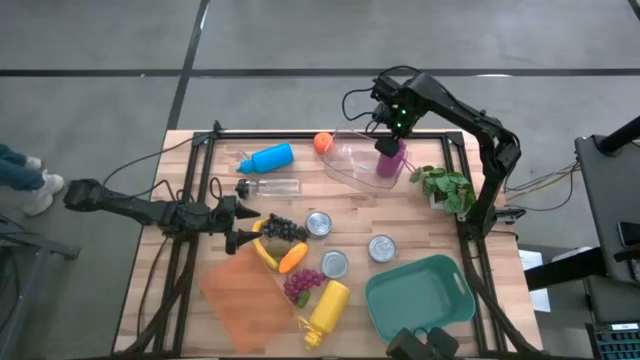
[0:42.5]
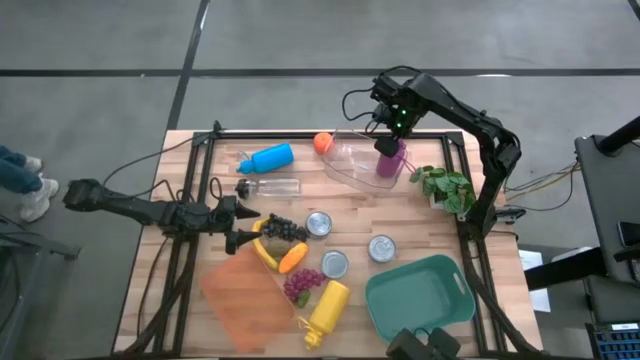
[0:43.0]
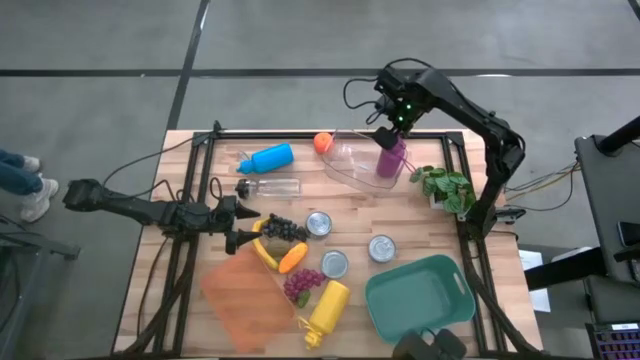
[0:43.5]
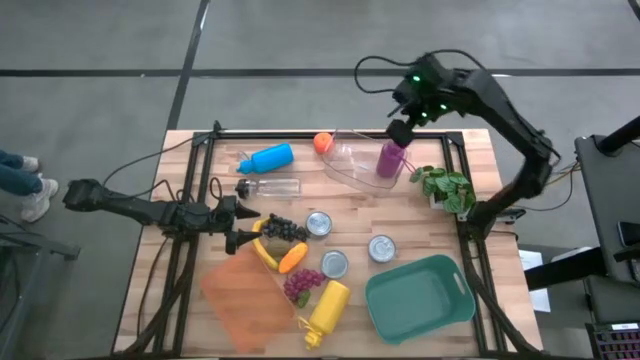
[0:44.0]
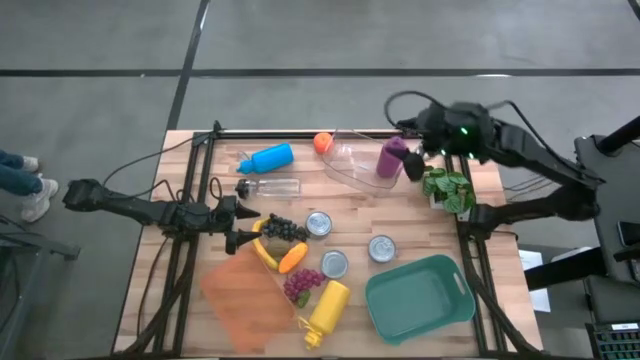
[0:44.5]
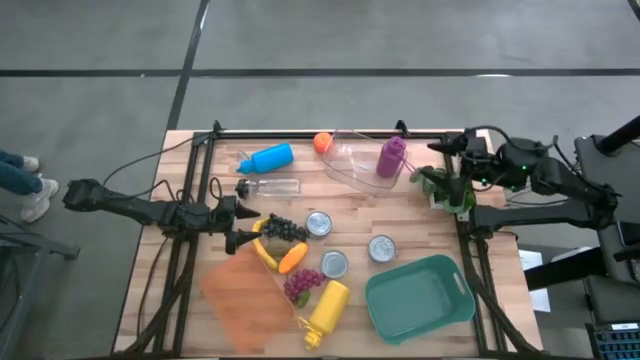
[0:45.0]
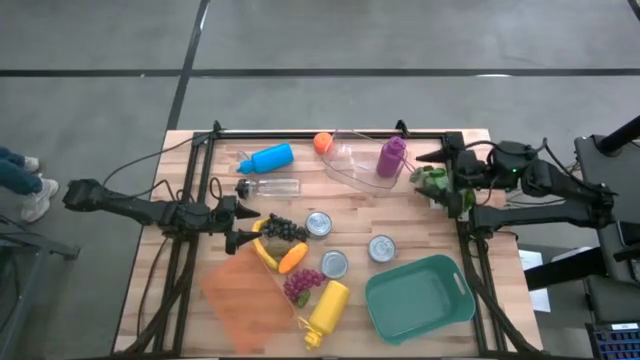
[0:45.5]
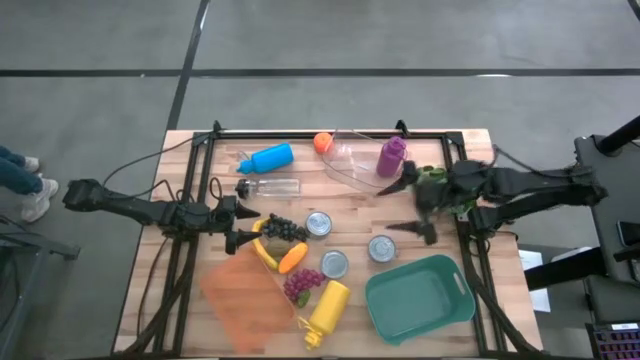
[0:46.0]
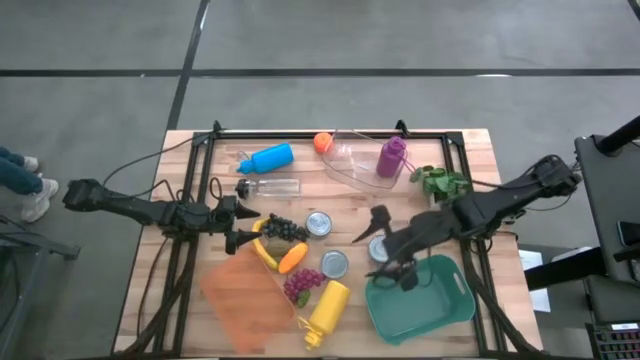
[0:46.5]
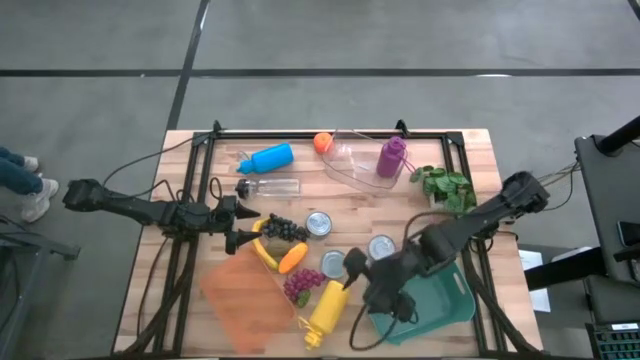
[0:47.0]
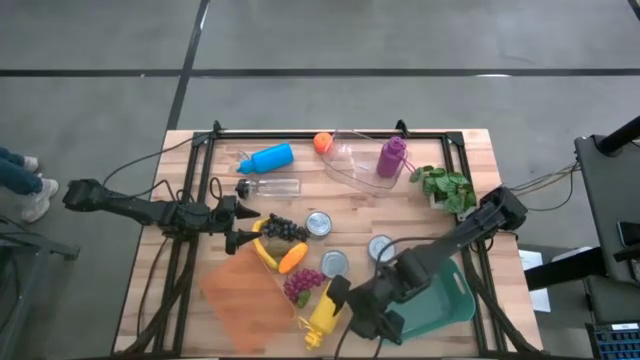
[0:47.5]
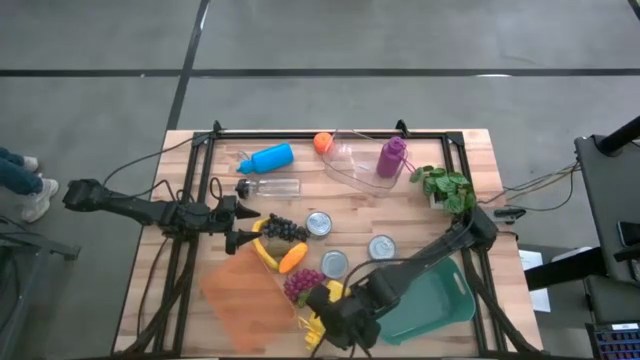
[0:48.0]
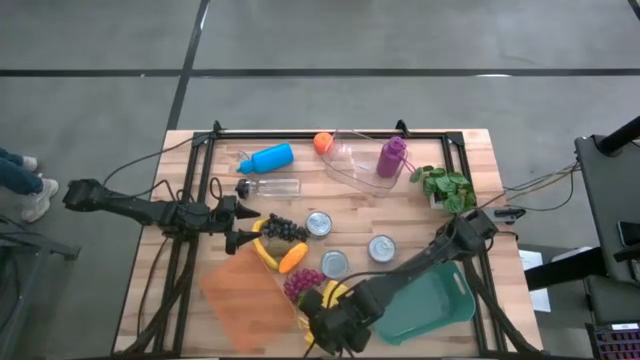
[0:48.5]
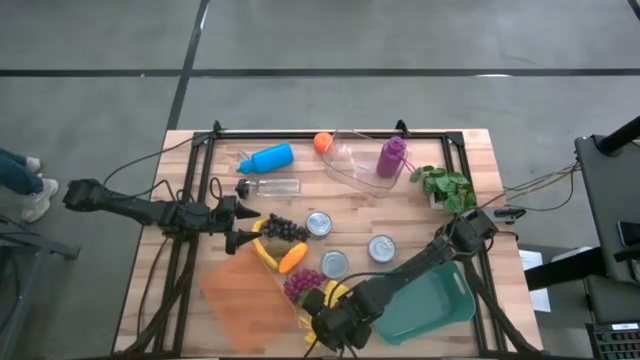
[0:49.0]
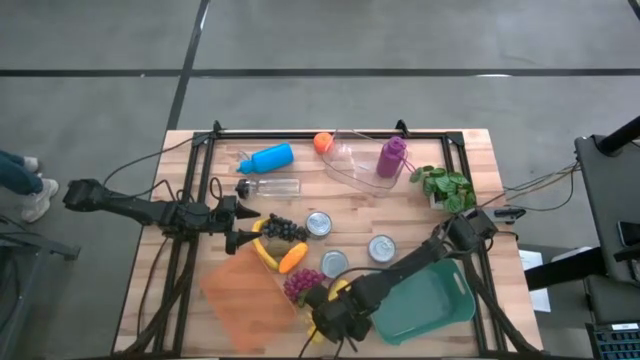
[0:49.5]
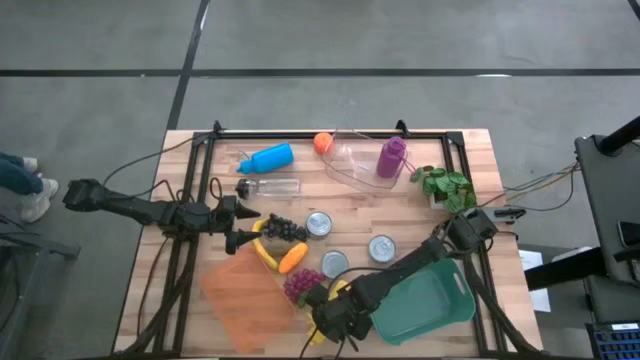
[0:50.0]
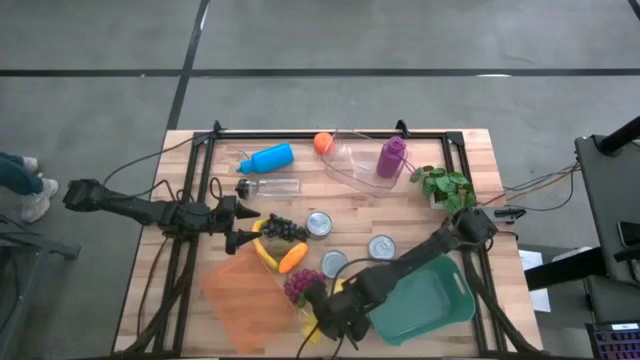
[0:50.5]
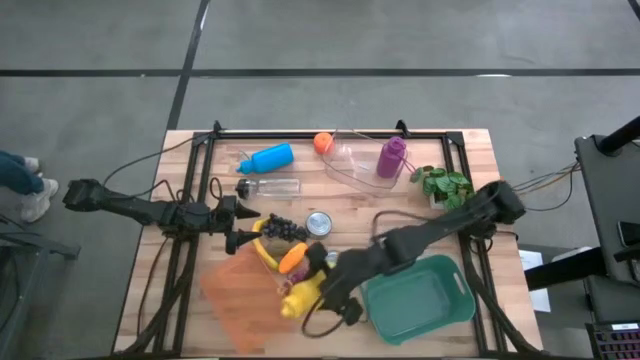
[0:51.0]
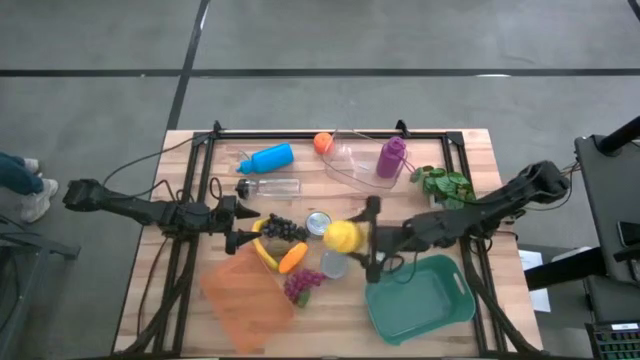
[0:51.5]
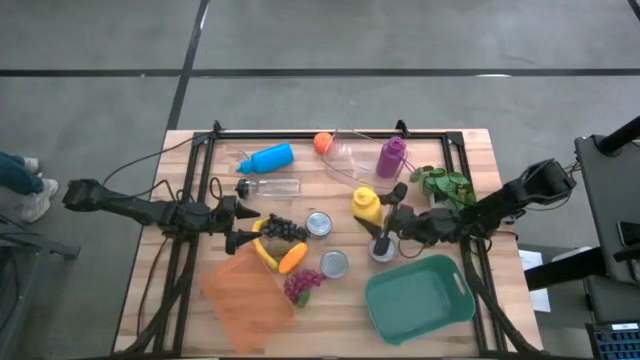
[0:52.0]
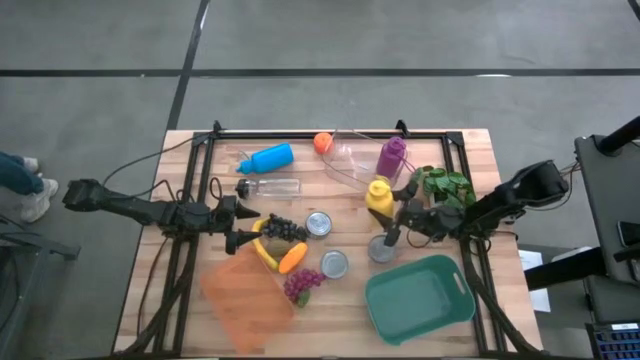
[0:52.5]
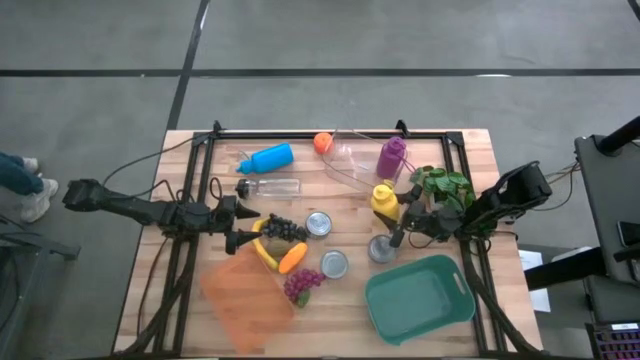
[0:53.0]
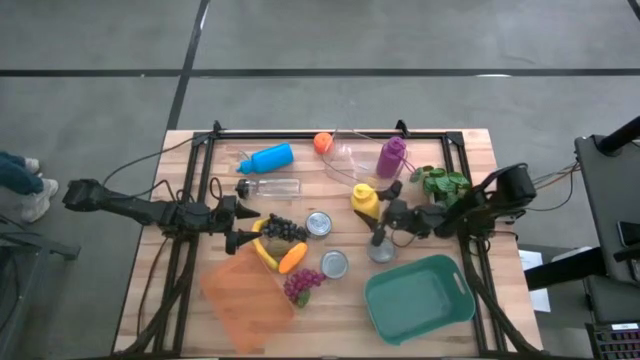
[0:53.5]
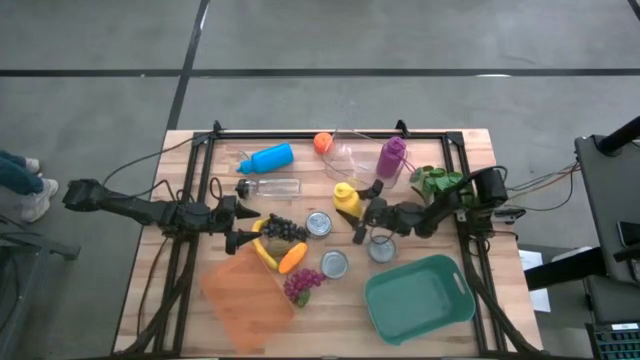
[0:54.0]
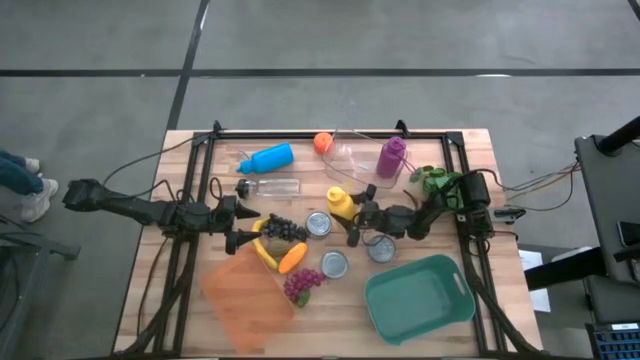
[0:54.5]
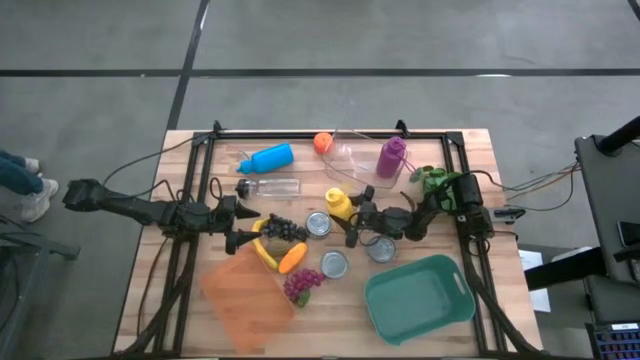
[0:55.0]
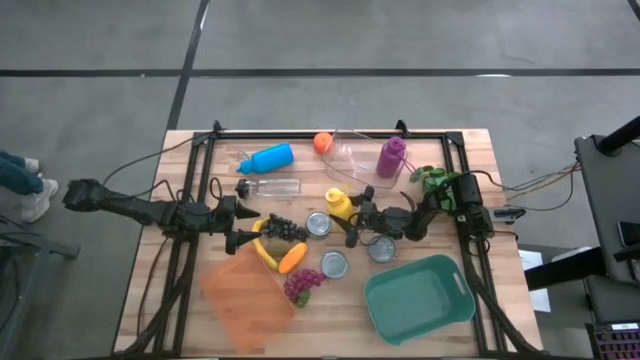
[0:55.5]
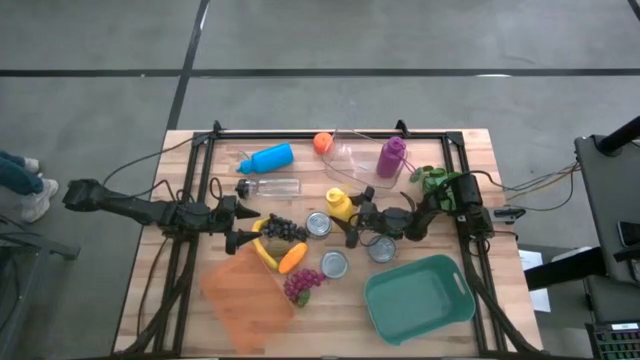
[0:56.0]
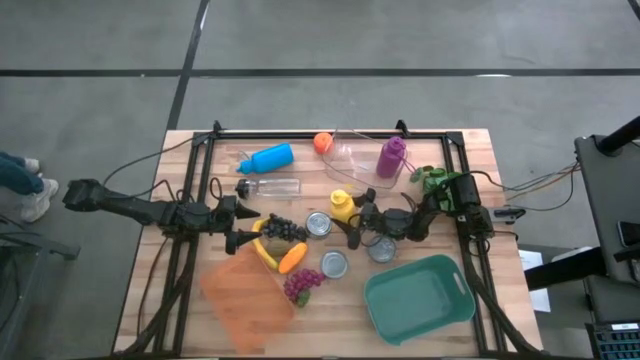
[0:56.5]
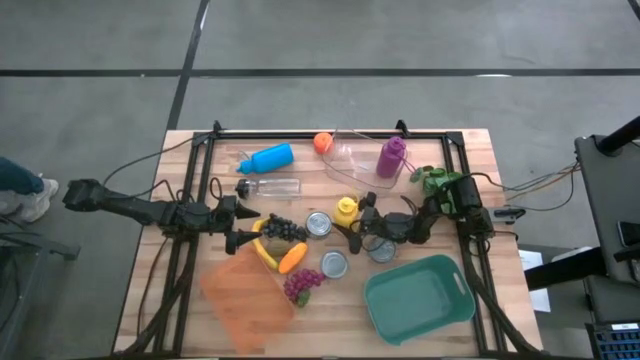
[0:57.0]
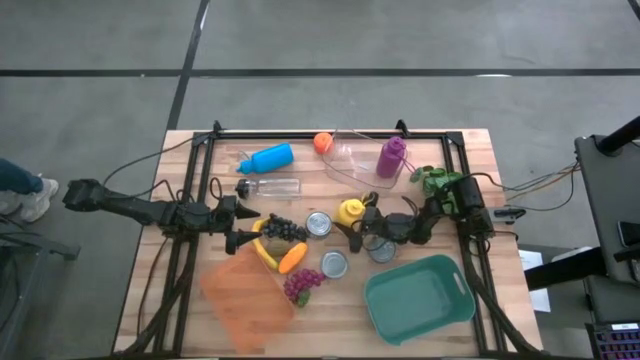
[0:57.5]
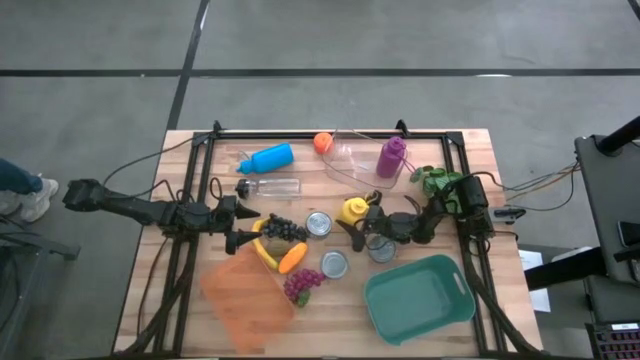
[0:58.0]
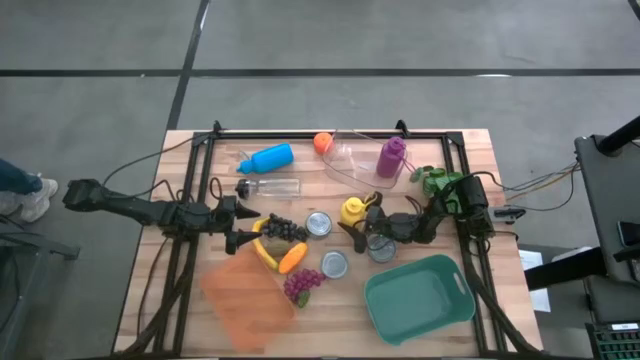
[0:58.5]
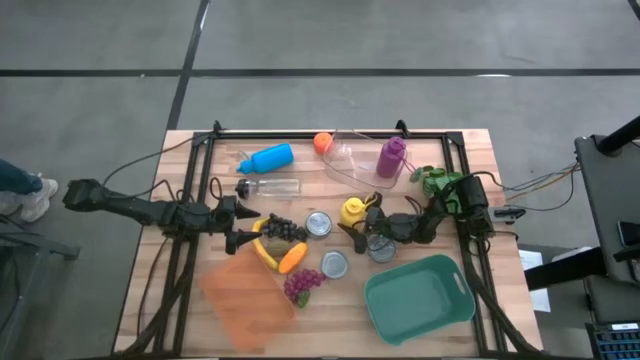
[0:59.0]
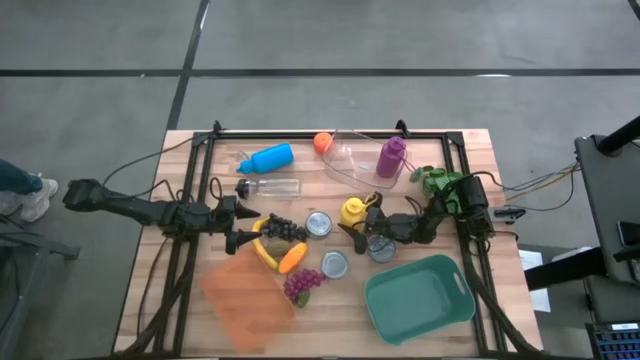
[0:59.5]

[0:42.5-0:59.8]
Task: Pick & Place Food Item
Put the yellow water bottle into the transparent bin

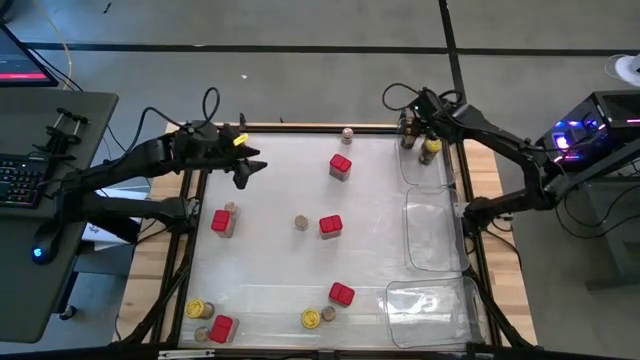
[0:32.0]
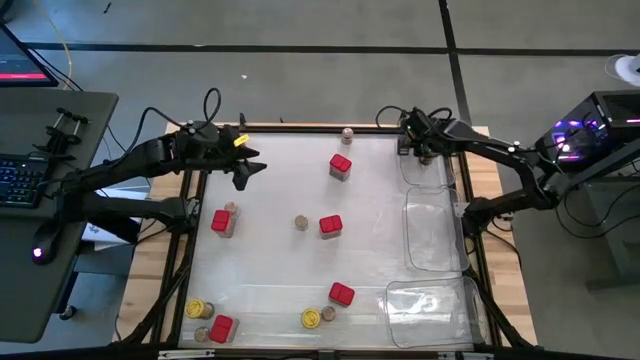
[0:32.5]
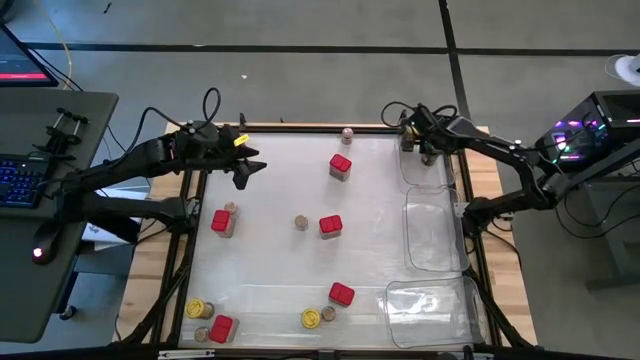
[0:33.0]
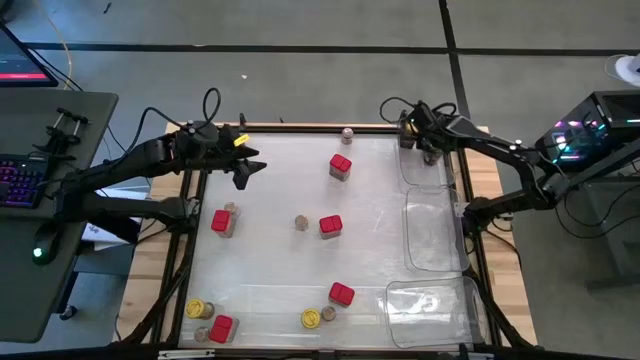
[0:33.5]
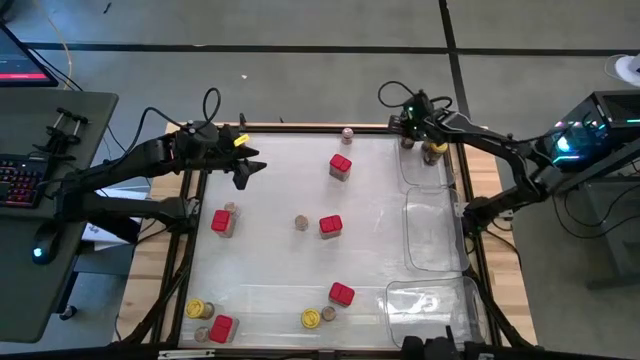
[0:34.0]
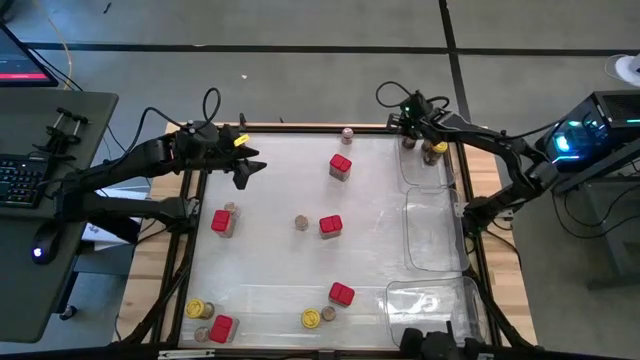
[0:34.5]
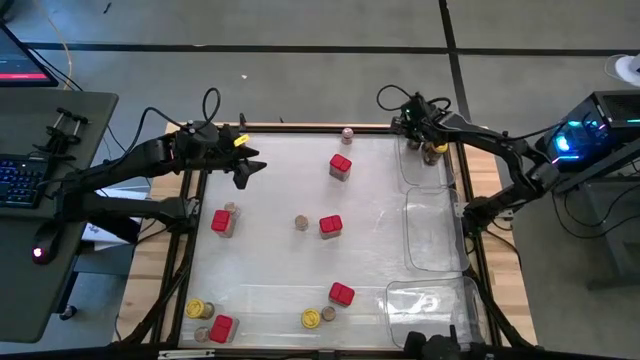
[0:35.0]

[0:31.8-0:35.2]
Task: Sort spices by type
Adjust the yellow seasoning bottles in the top transparent bin

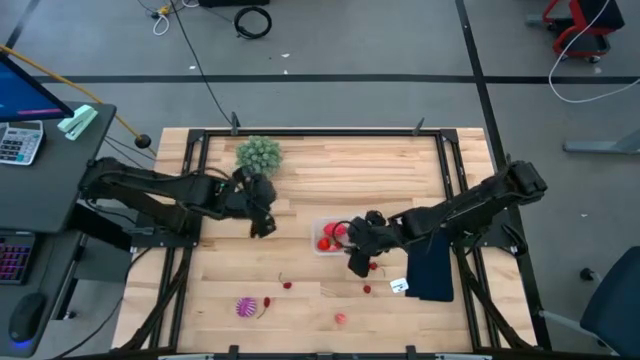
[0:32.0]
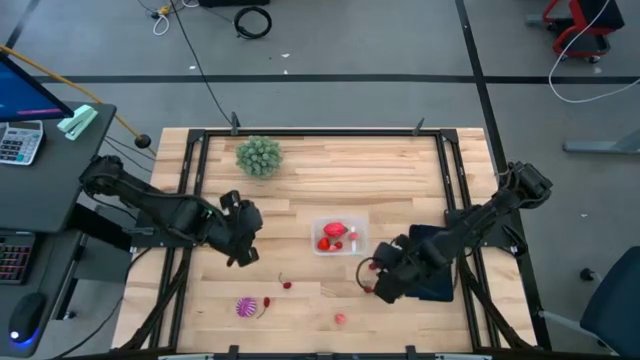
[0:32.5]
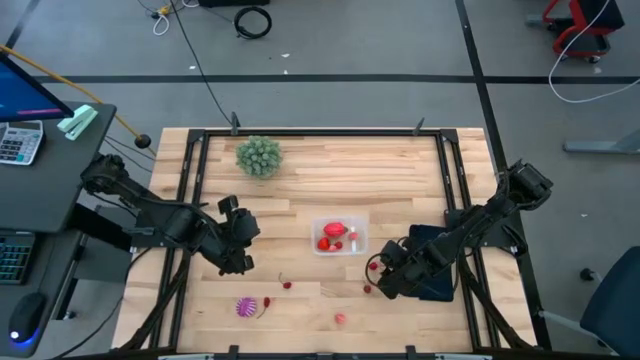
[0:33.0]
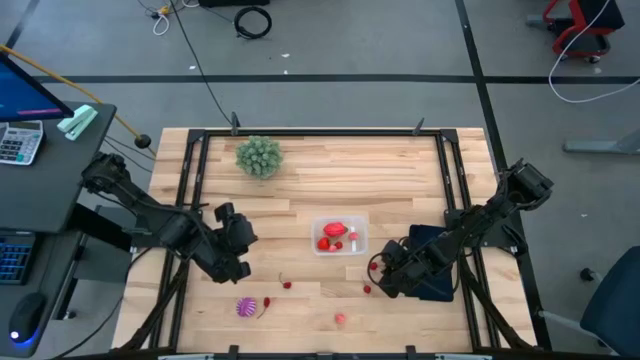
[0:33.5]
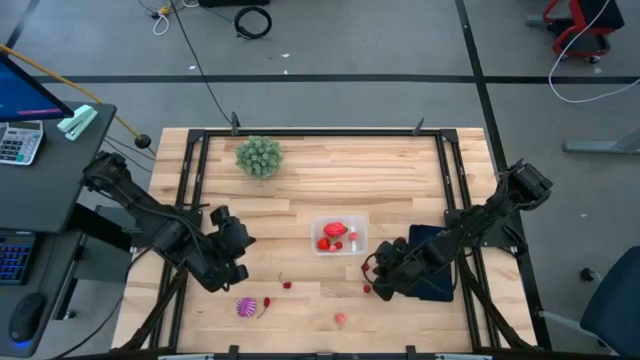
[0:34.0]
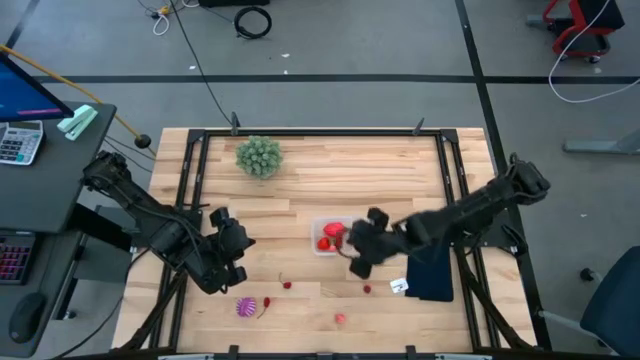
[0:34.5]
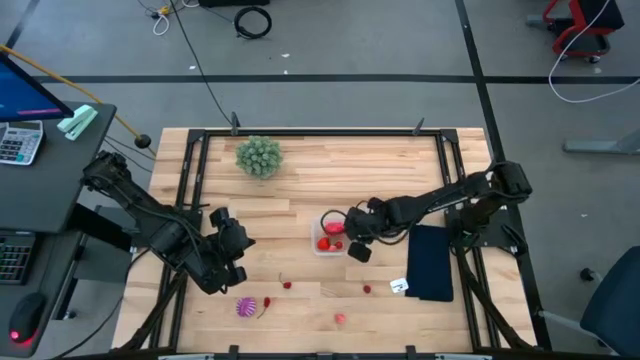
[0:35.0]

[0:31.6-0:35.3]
Task: Pick and placing Produce into tupperware
Put the red cherry into the transparent bin
